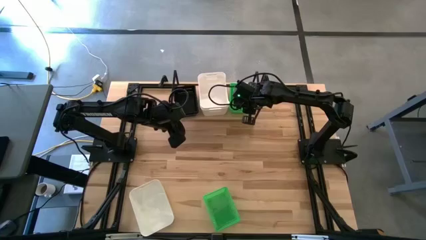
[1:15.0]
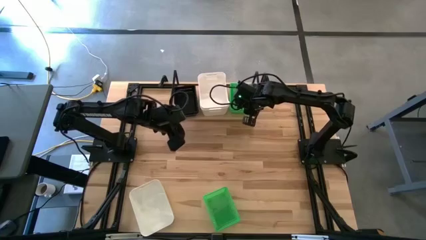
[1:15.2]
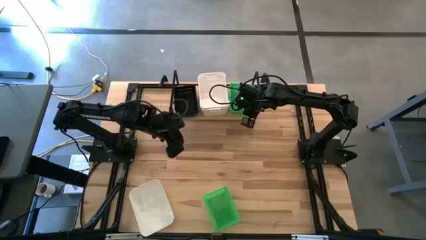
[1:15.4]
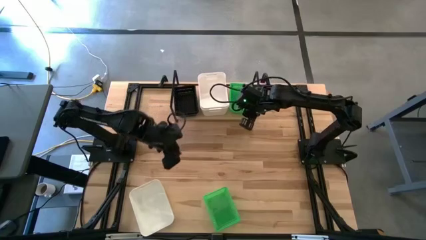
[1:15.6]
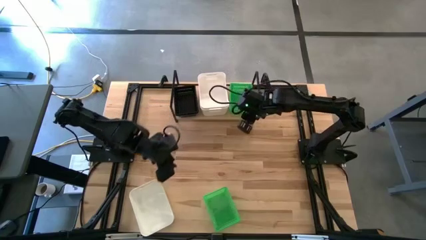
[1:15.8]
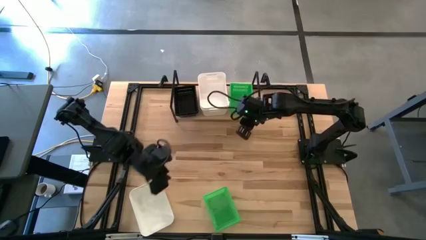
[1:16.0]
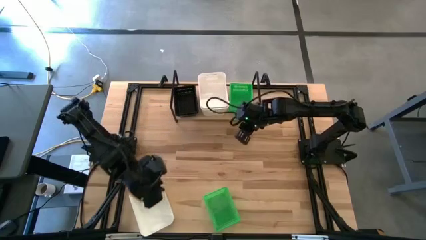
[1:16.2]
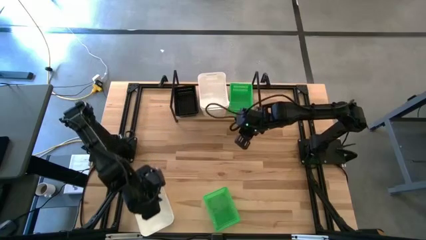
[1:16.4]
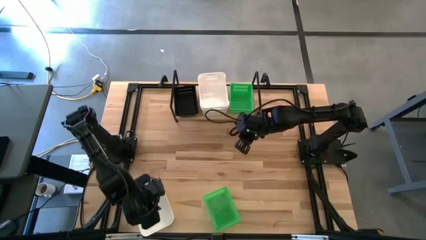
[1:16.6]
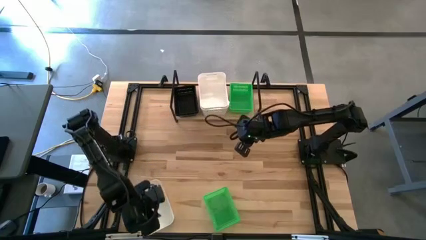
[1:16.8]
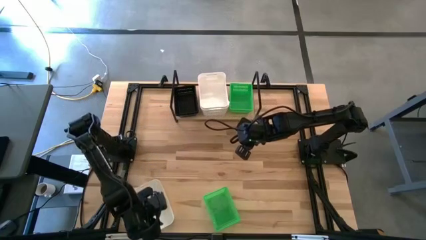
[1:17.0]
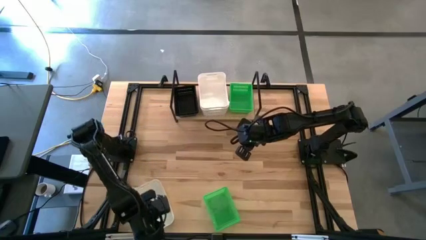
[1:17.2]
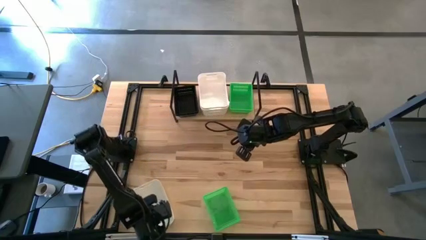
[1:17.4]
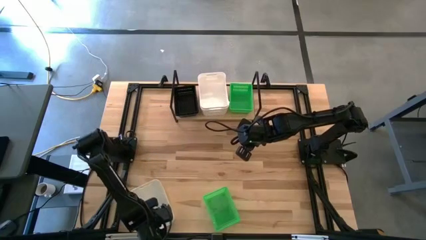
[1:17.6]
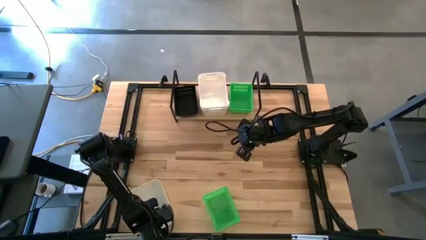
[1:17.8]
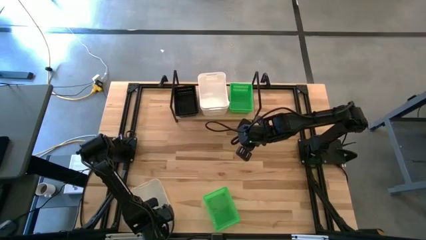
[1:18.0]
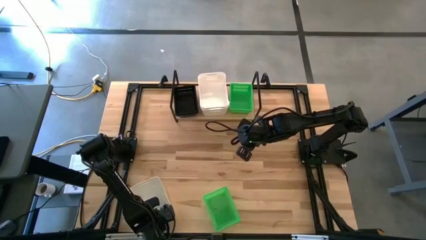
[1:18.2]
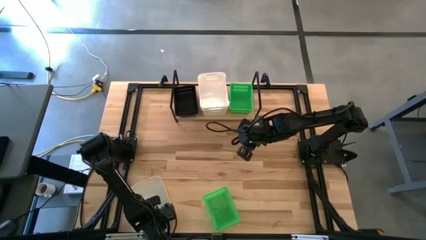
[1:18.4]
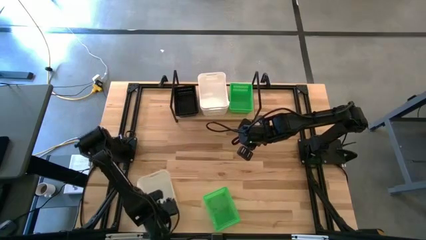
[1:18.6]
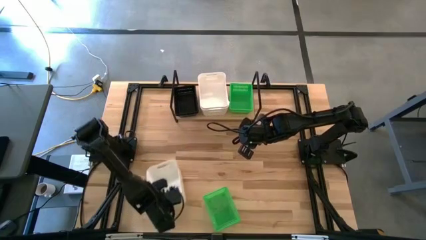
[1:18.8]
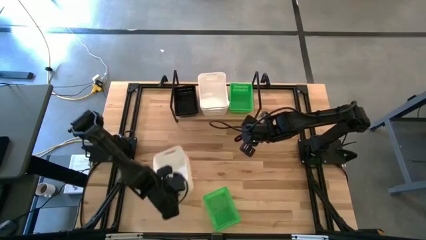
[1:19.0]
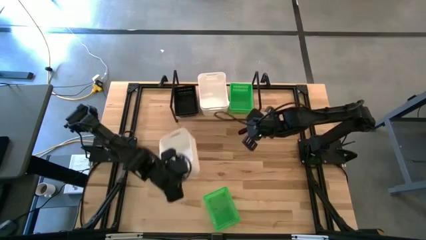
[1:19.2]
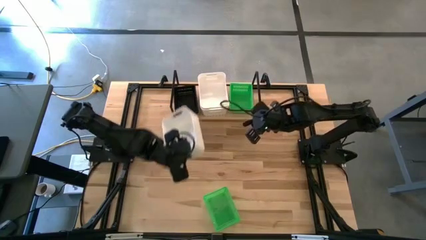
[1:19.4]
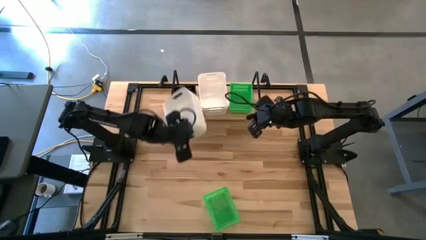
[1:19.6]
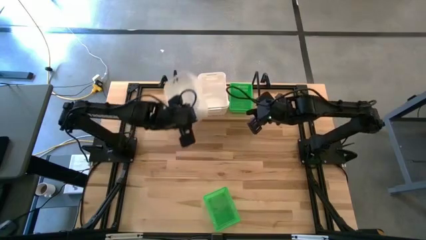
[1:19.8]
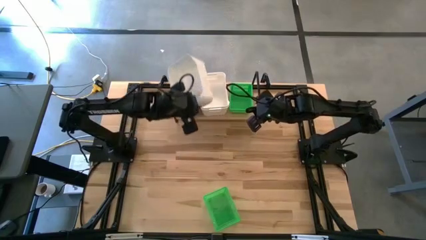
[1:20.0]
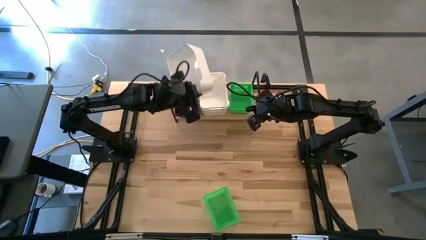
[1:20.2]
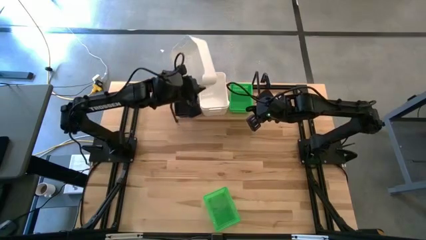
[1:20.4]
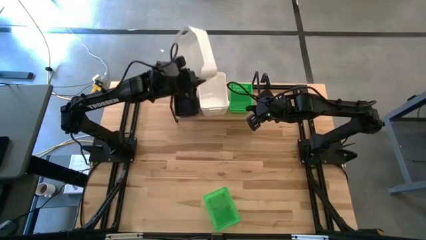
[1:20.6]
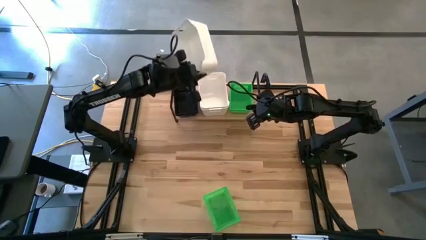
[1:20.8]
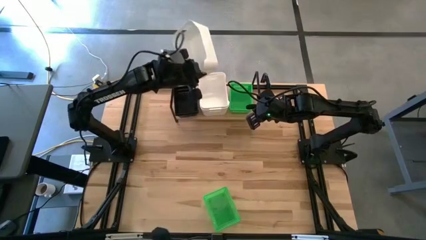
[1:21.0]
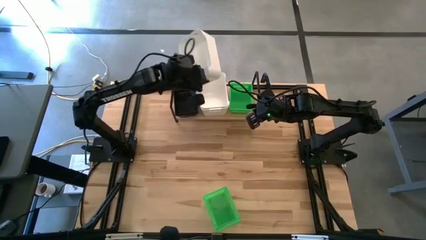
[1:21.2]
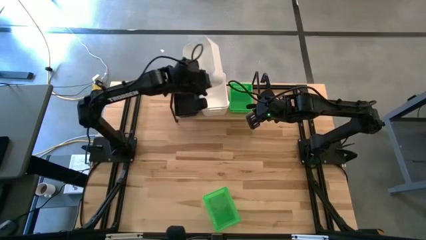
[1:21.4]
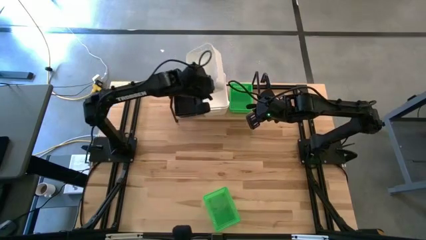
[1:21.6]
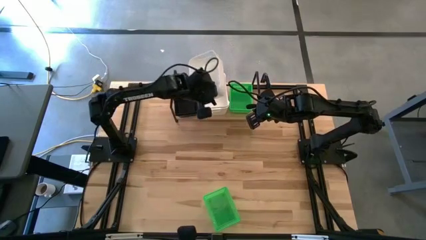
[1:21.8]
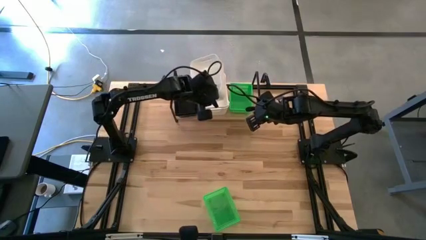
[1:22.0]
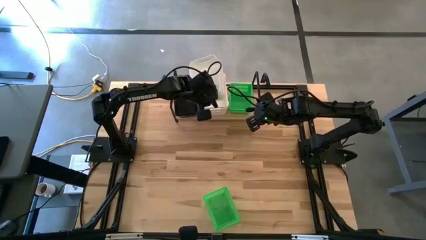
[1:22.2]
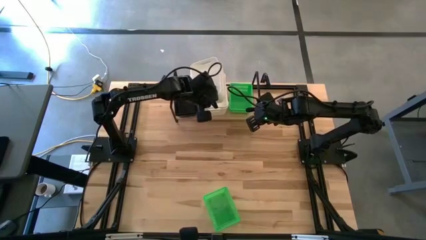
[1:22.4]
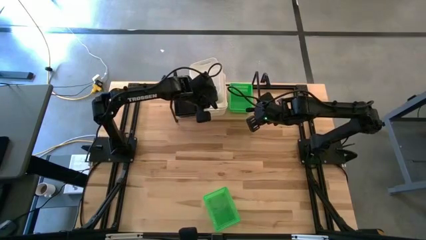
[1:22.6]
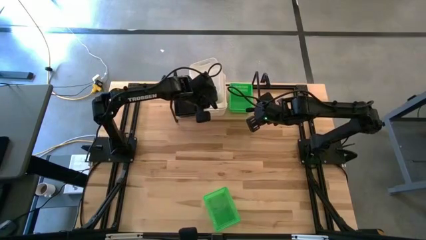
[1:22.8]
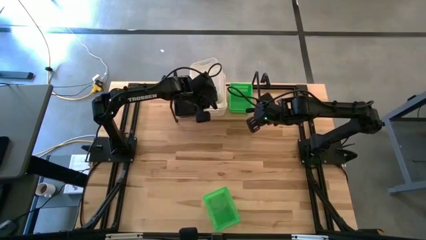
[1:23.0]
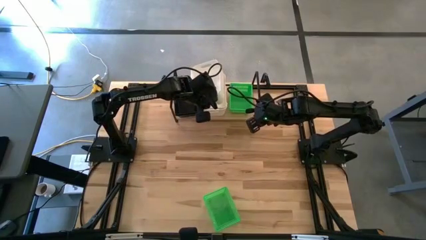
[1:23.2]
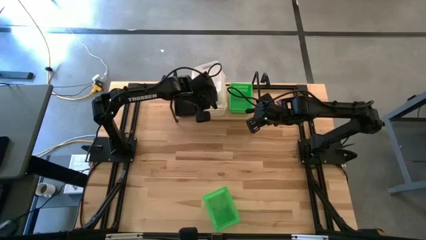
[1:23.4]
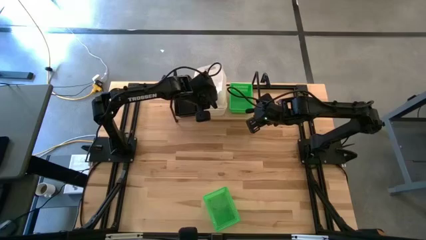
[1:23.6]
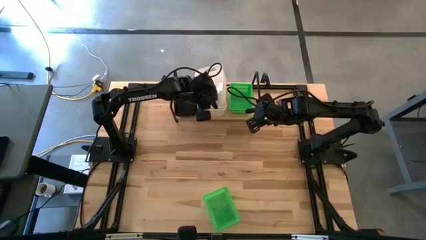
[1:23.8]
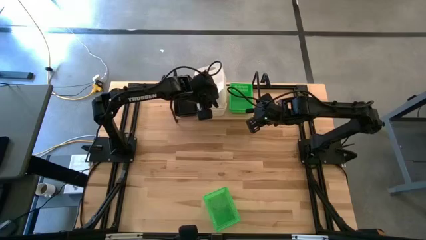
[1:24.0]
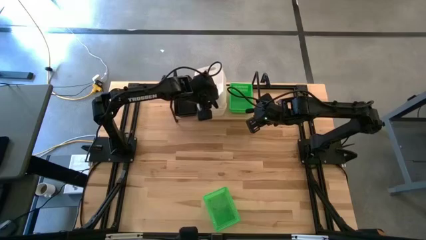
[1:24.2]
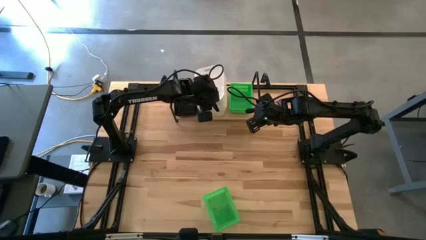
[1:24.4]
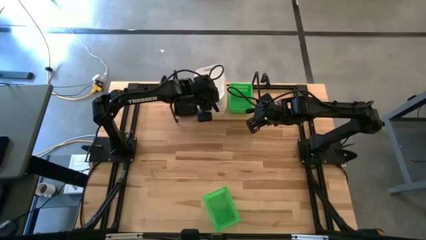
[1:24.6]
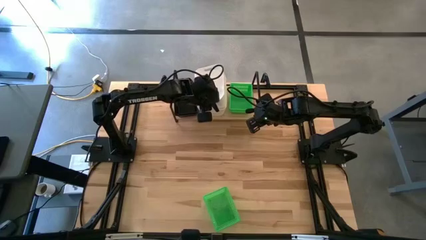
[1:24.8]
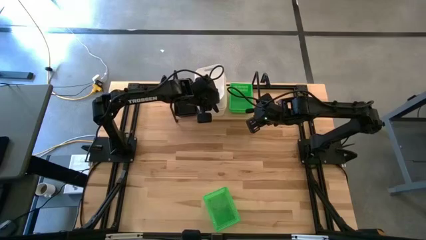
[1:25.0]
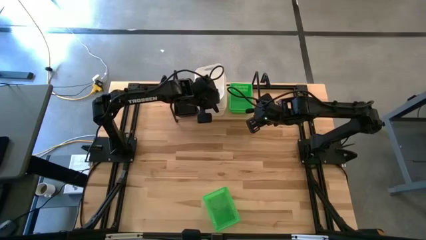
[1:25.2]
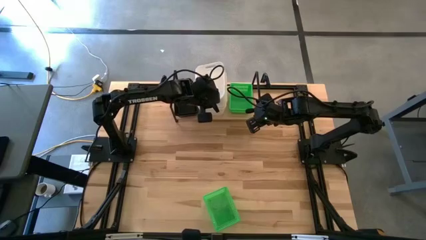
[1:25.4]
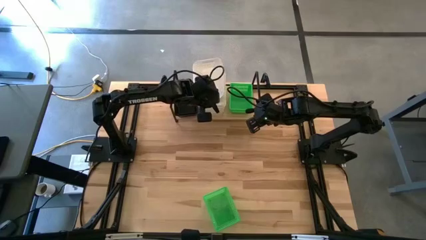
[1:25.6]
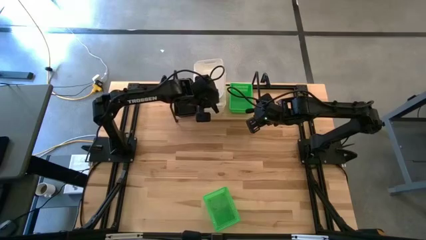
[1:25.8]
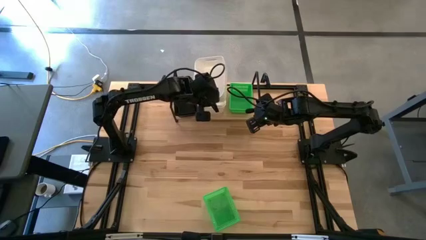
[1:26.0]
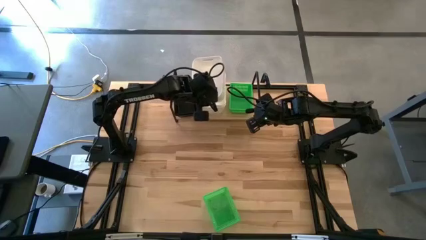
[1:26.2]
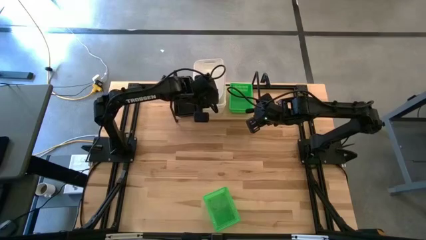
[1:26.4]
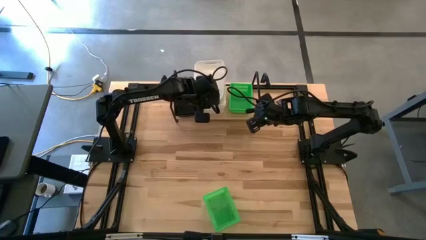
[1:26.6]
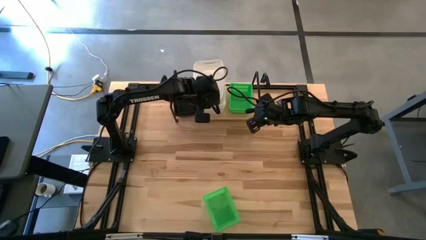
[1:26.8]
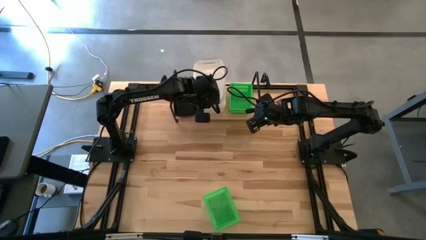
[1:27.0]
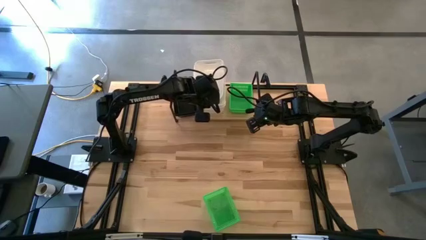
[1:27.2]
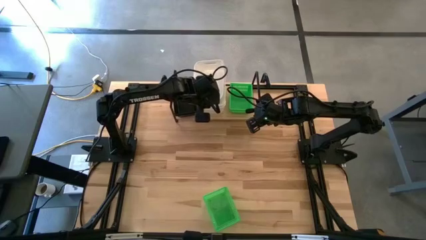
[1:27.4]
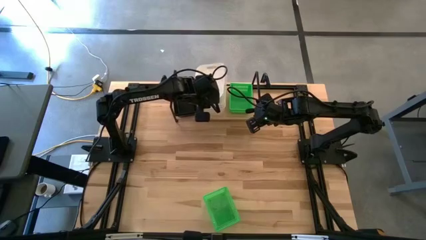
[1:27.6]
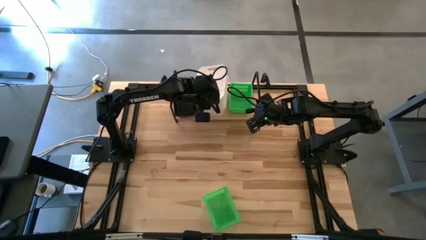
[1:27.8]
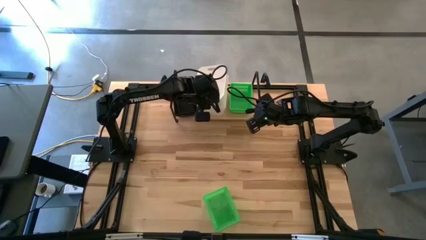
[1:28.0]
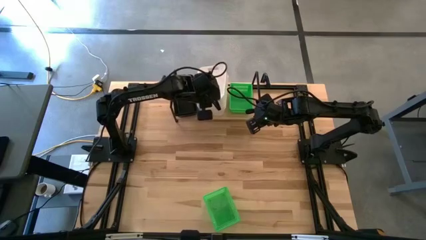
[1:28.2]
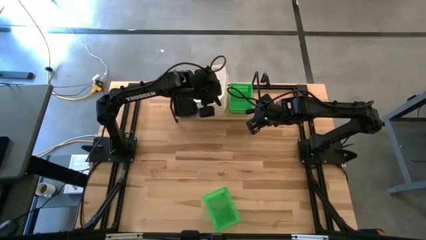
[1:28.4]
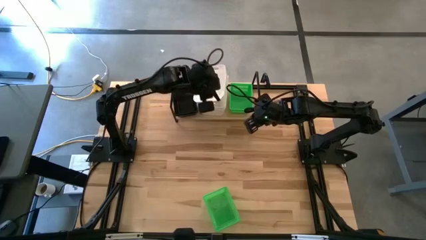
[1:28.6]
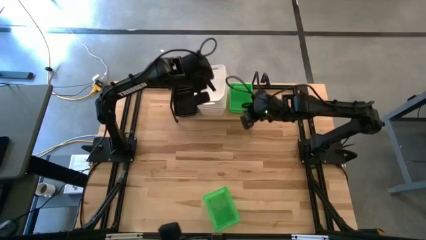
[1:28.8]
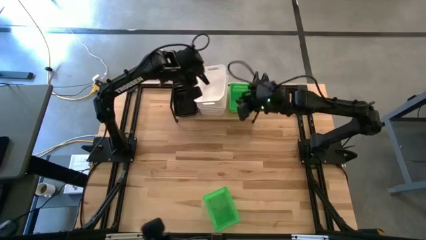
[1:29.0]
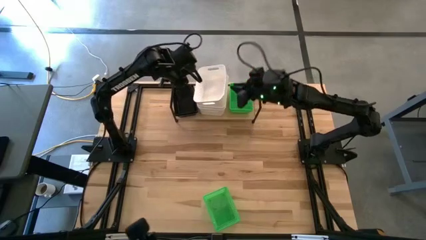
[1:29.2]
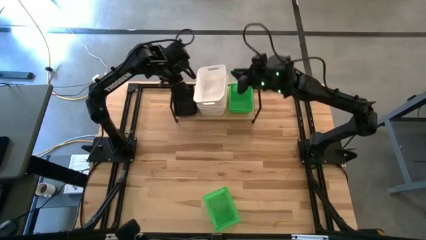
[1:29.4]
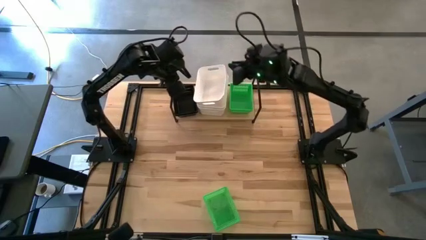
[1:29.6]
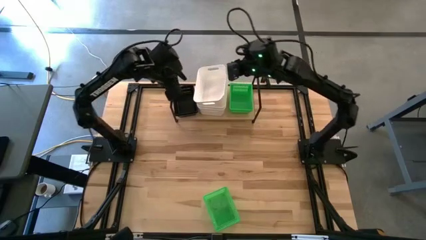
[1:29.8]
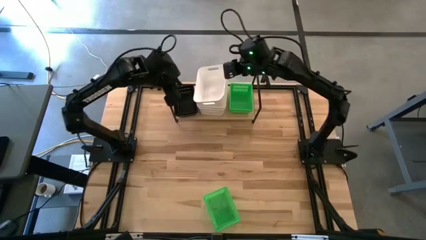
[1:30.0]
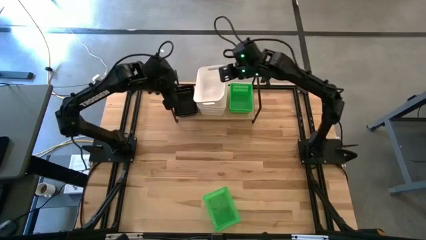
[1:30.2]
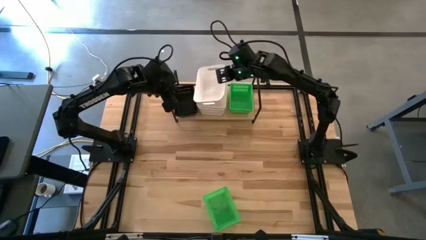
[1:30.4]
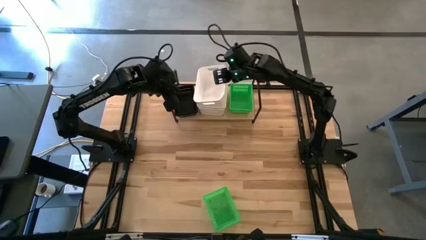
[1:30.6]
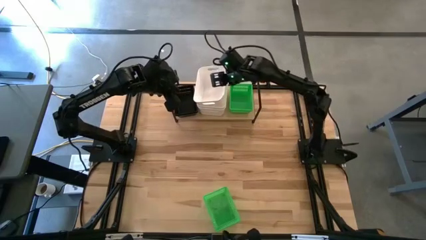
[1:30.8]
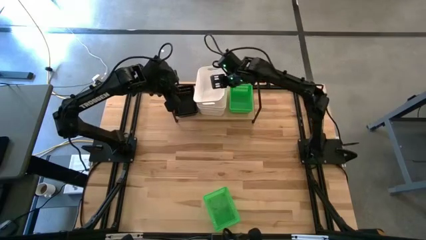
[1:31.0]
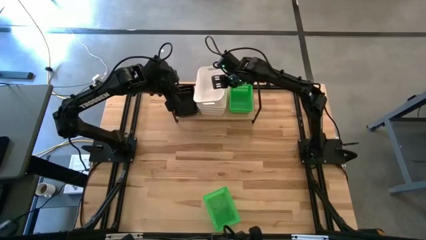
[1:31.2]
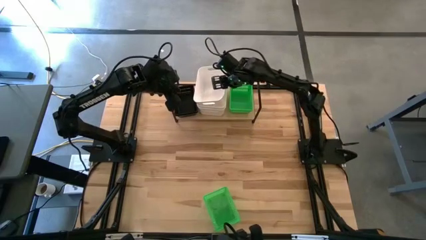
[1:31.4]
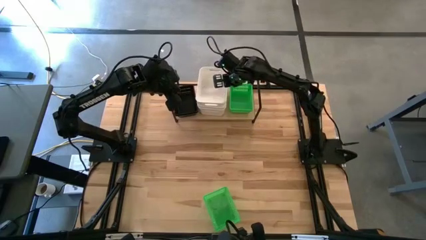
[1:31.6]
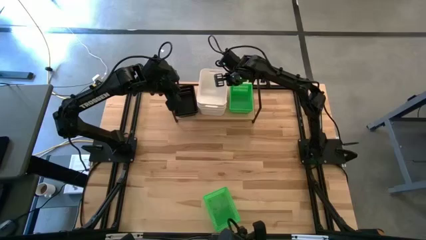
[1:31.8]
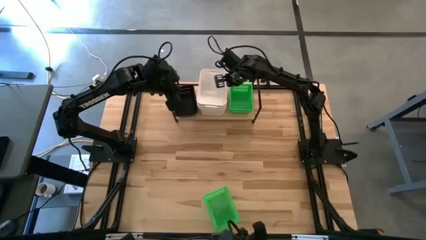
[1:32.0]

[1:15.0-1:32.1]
Task: Stack baskets on shelf by color
Stack the white bin on top of the white bin on the shelf

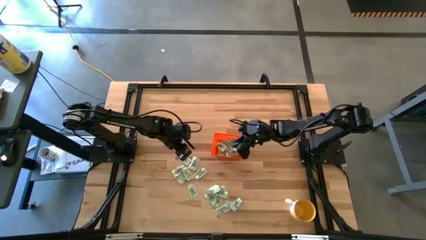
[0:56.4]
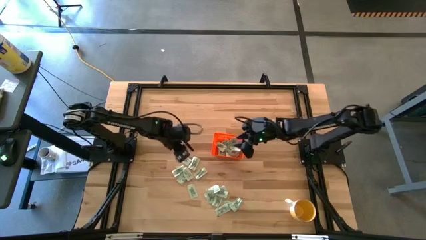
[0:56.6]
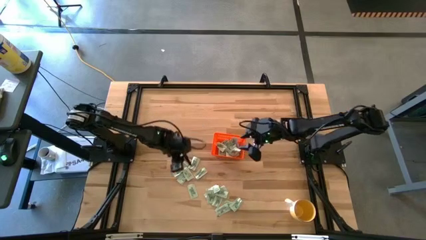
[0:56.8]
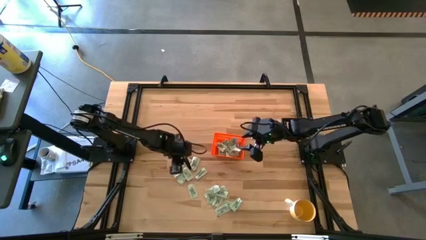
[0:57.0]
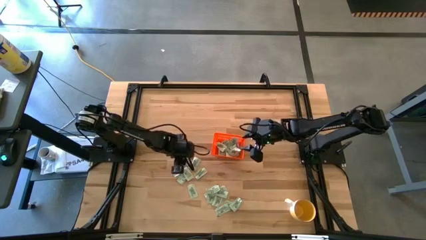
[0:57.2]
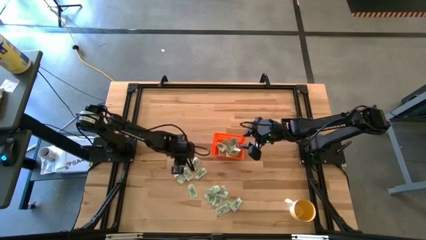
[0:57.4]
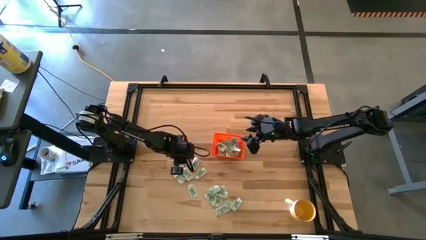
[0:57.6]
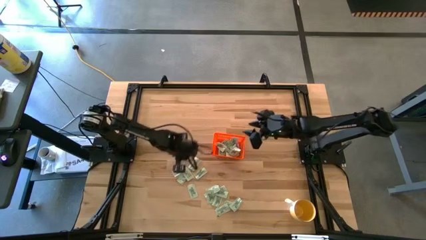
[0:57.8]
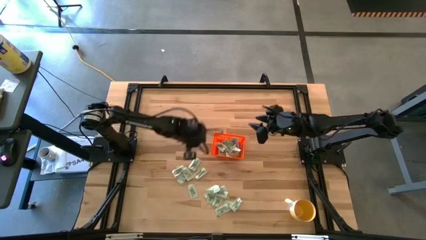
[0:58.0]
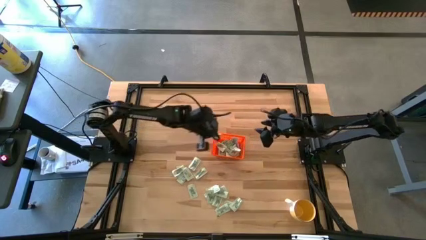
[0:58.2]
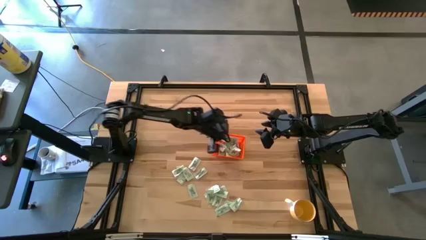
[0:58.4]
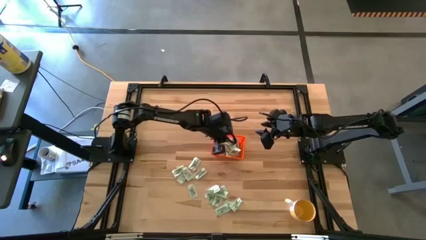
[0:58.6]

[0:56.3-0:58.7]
Task: Pick and place Stevia / Truvia into bins
Put the white stevia packet into the orange bin
